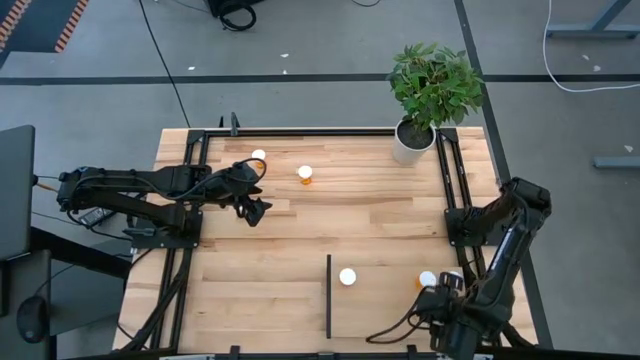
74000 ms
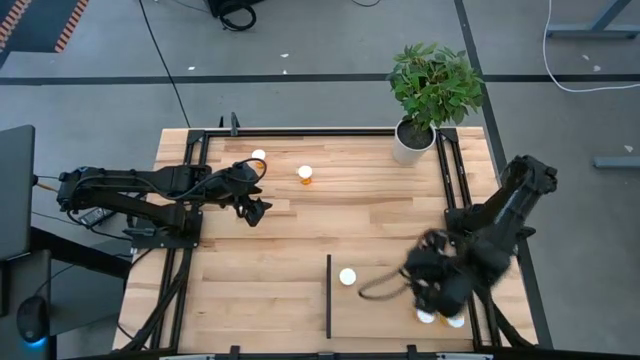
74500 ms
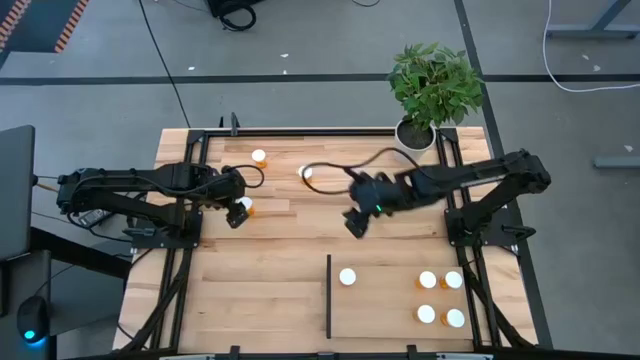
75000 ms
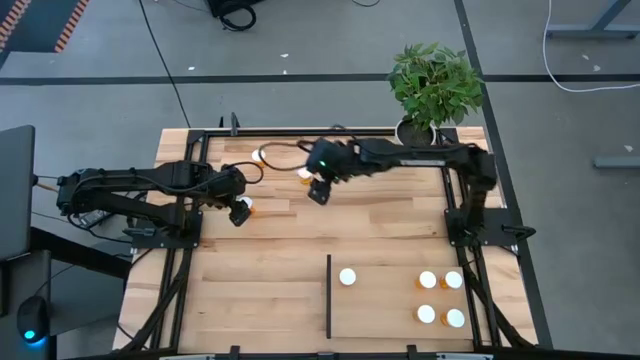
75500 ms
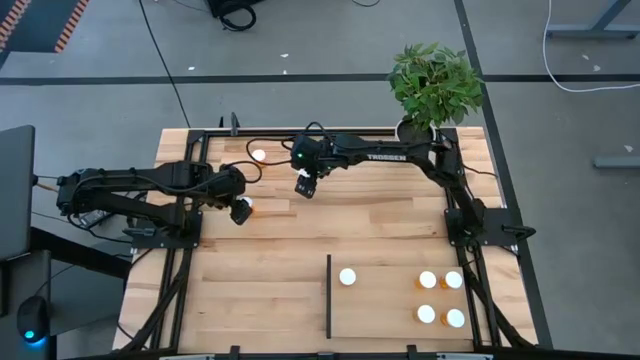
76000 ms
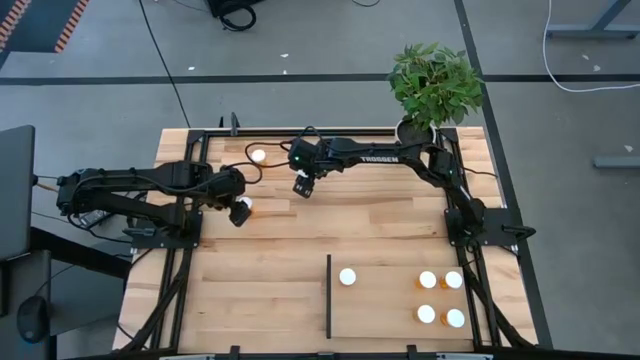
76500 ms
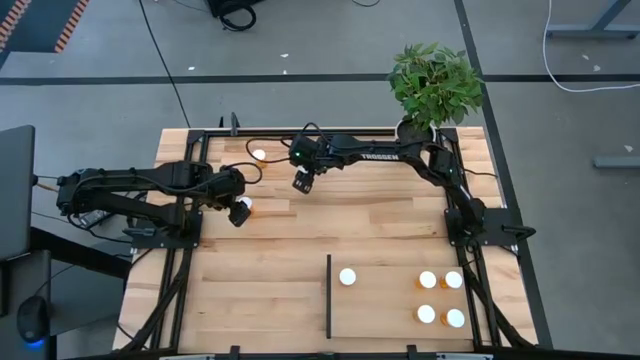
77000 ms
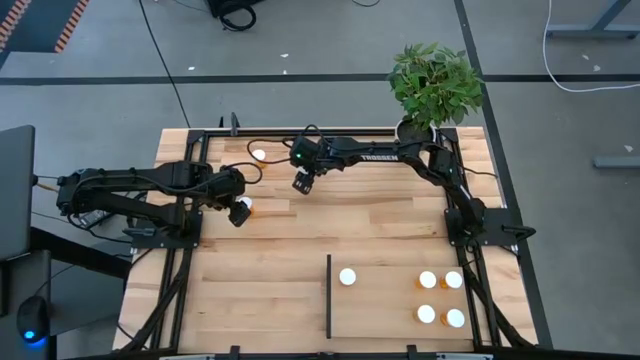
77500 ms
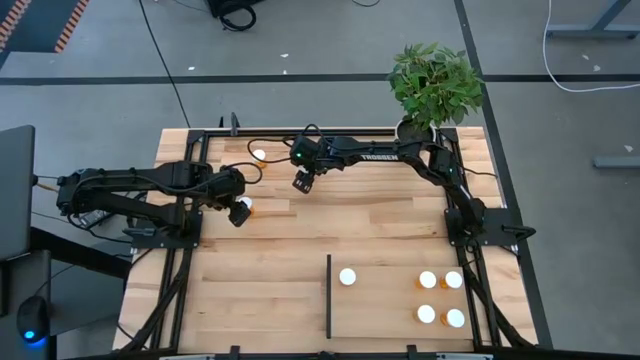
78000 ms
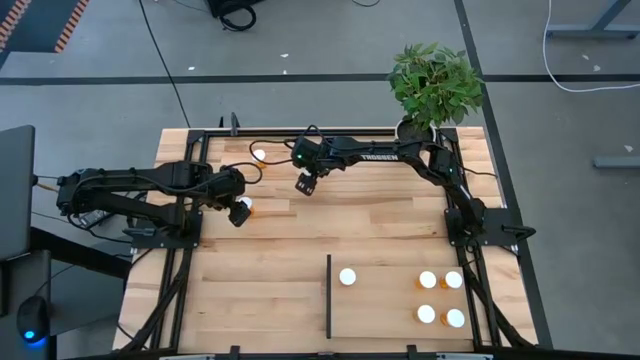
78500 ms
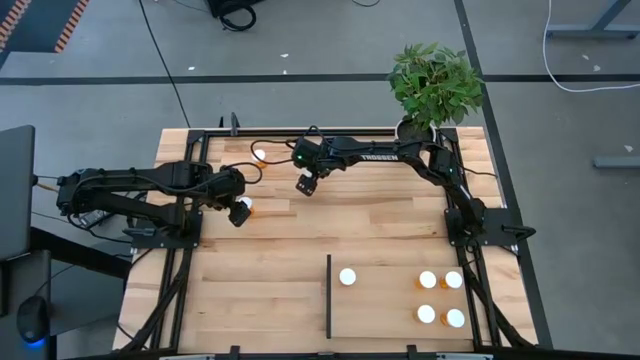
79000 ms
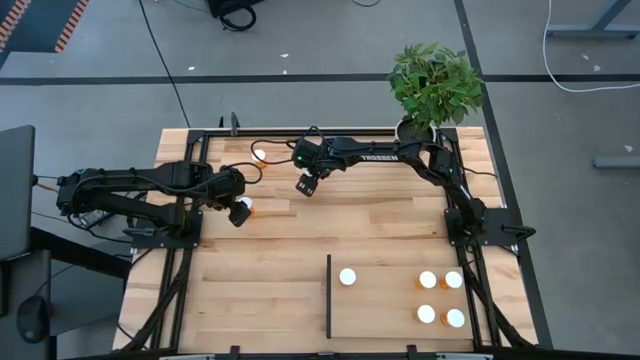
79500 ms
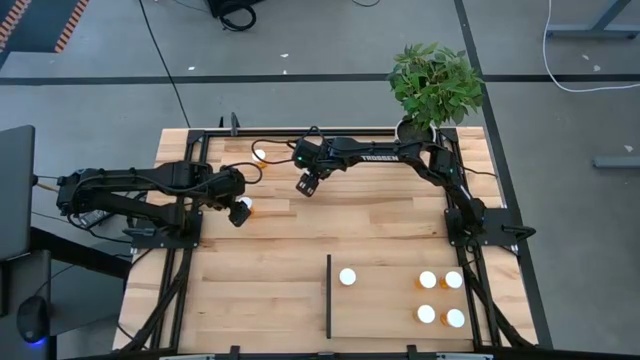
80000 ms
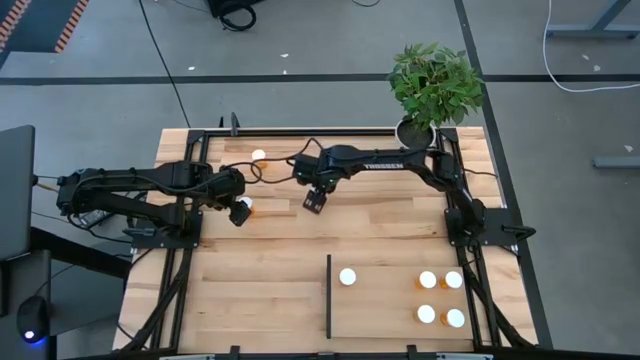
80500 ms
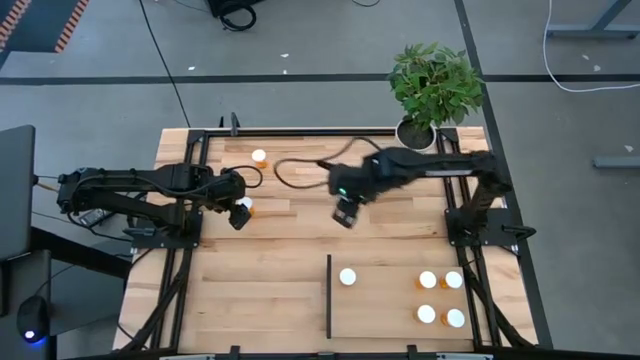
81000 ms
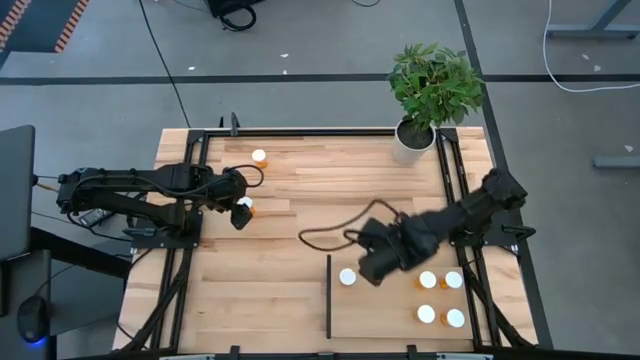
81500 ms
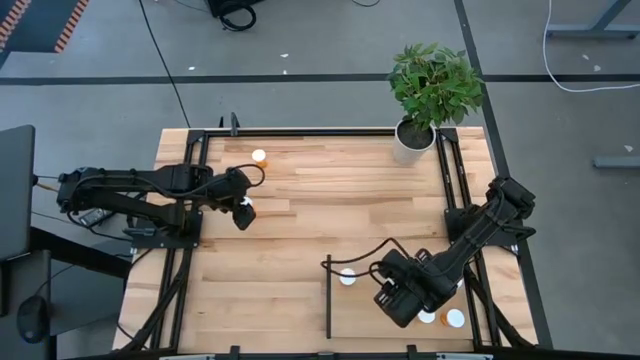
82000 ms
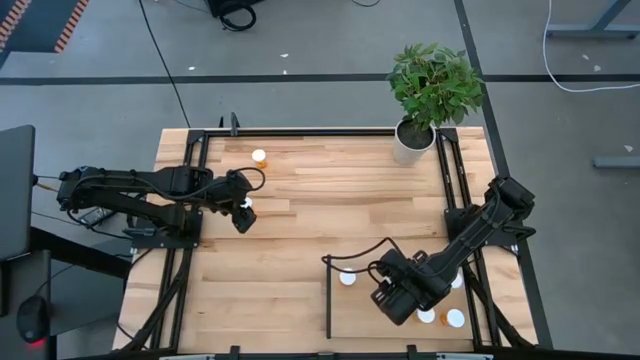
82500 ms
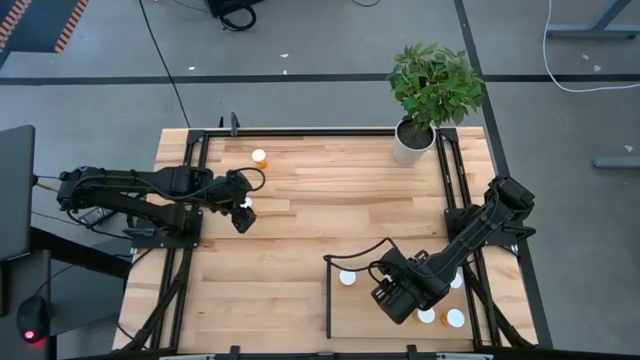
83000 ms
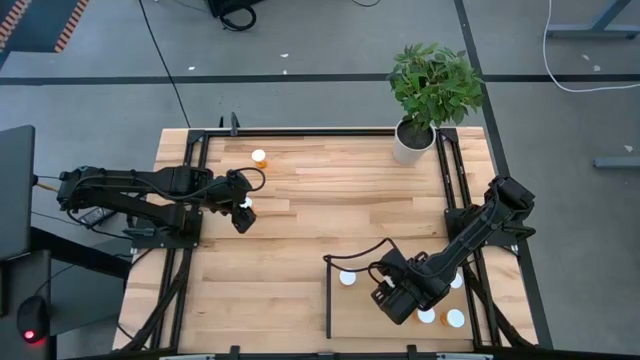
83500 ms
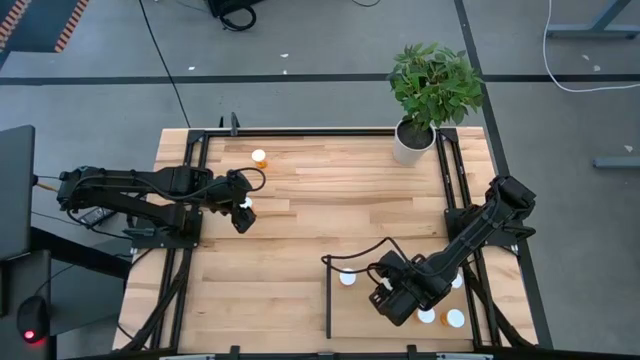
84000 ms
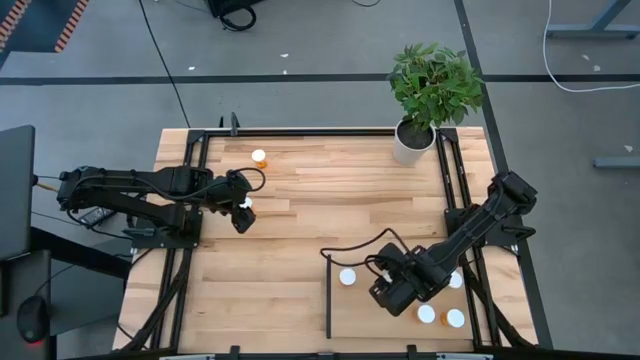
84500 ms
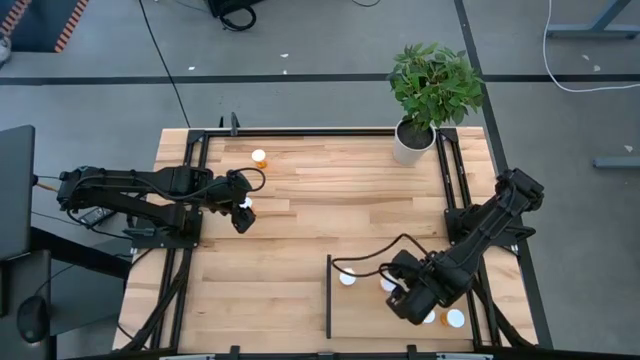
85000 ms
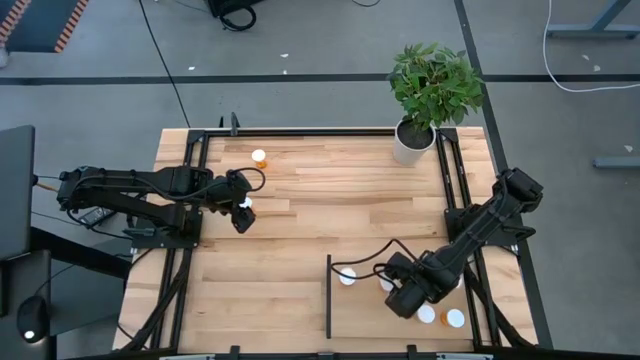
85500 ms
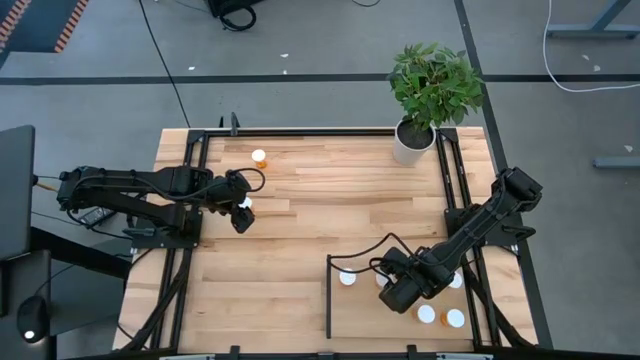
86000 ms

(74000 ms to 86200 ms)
Task: Pick and place medicine bottles onto shelf by color
Put the orange pill bottle on the shelf aligned with the other orange pill bottles

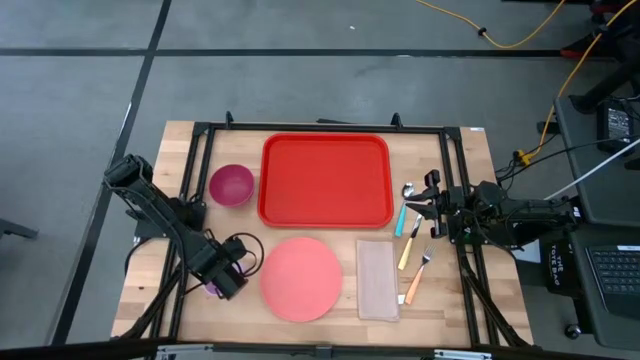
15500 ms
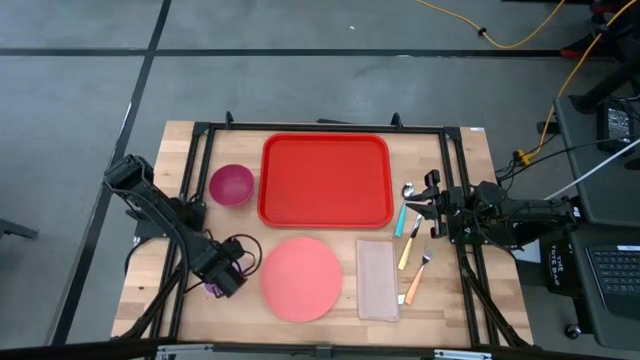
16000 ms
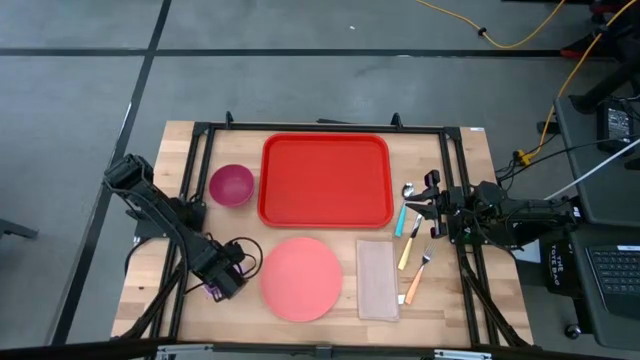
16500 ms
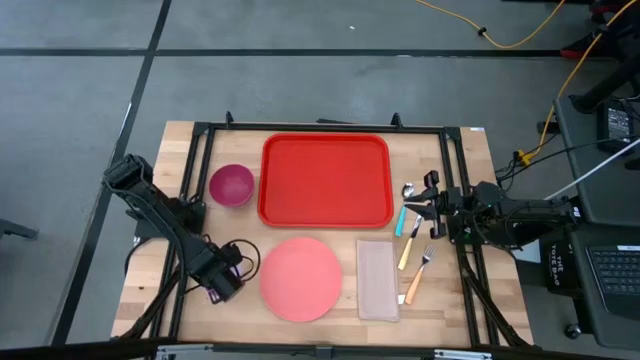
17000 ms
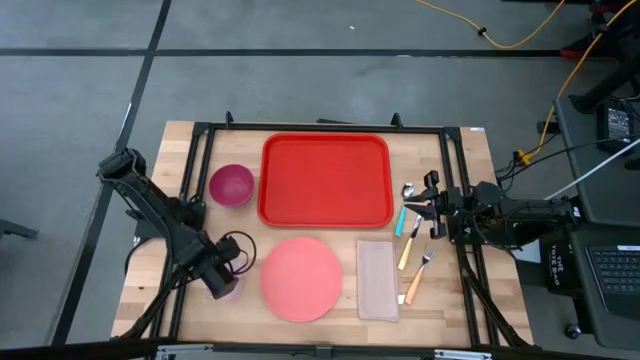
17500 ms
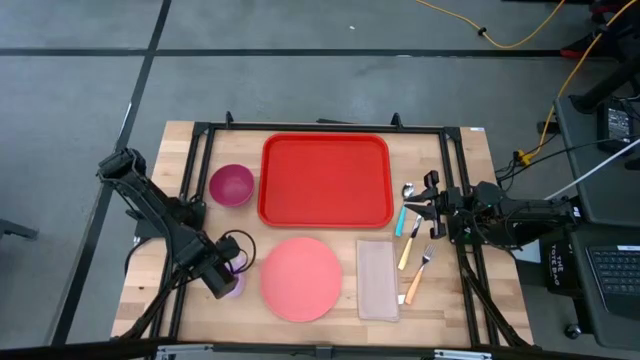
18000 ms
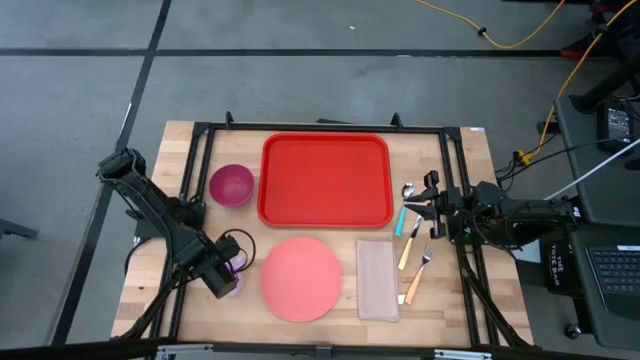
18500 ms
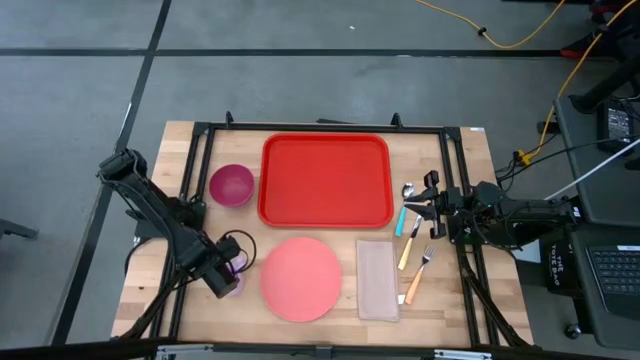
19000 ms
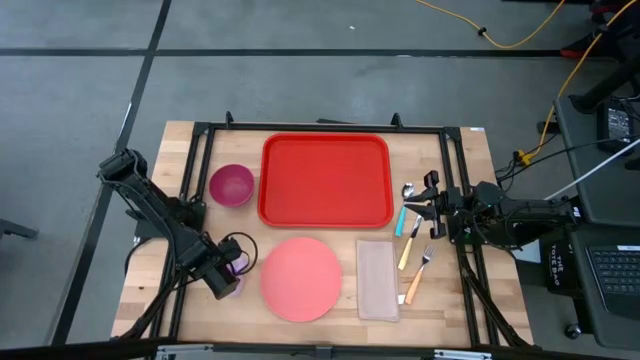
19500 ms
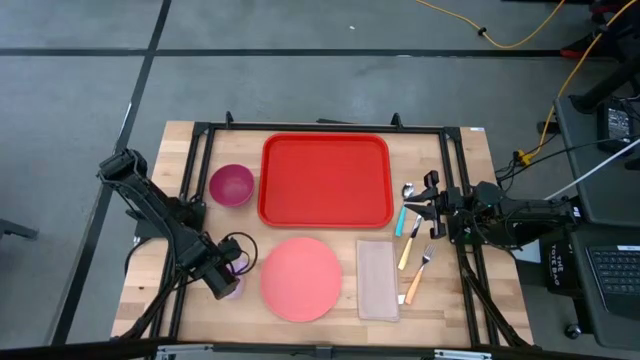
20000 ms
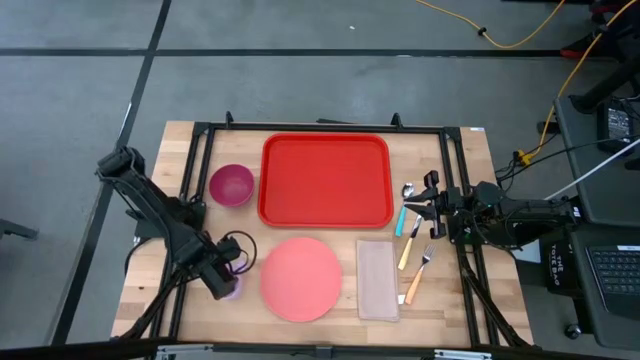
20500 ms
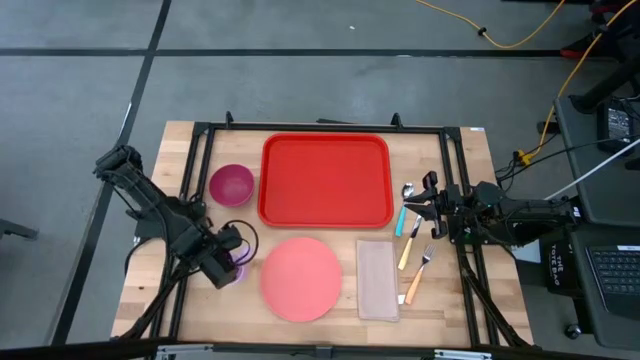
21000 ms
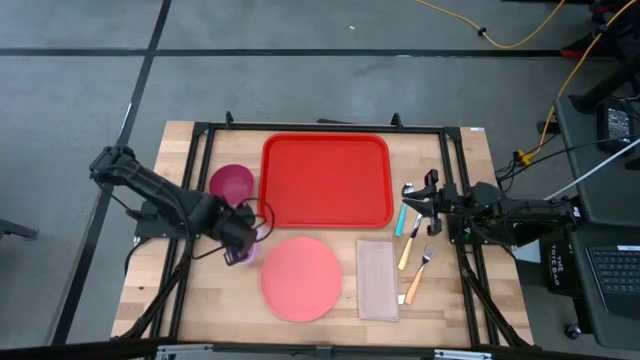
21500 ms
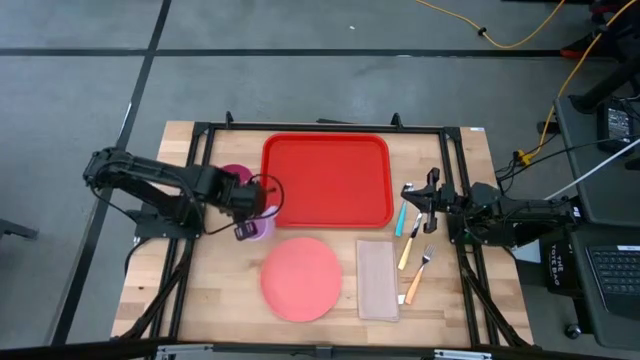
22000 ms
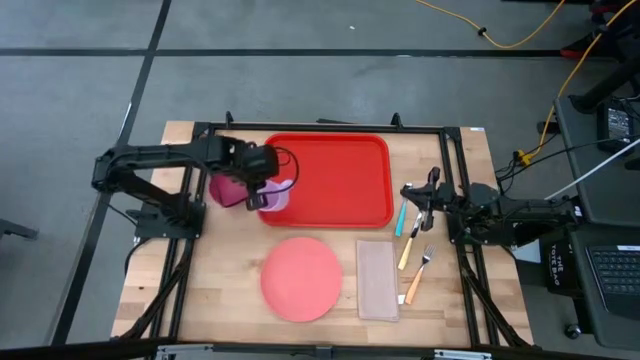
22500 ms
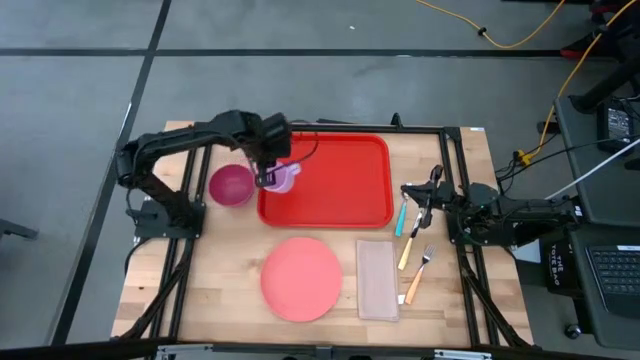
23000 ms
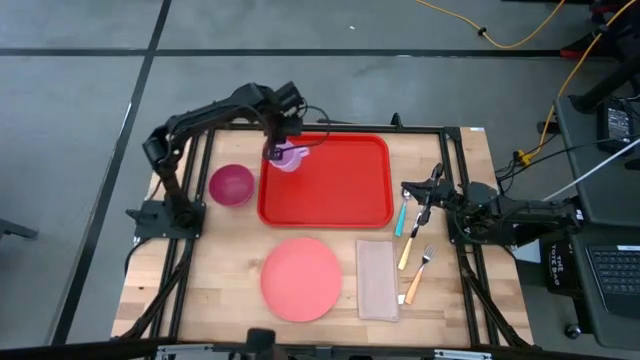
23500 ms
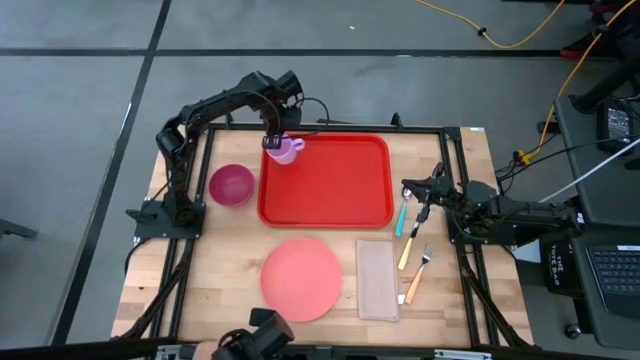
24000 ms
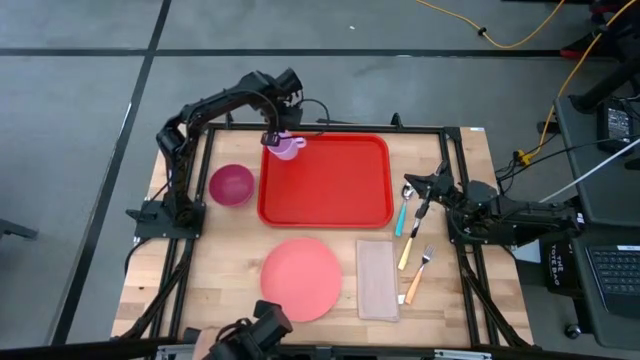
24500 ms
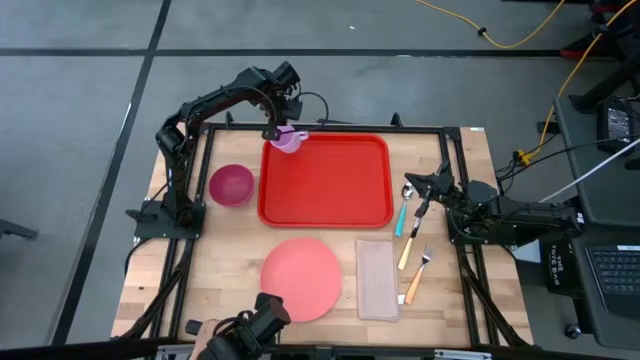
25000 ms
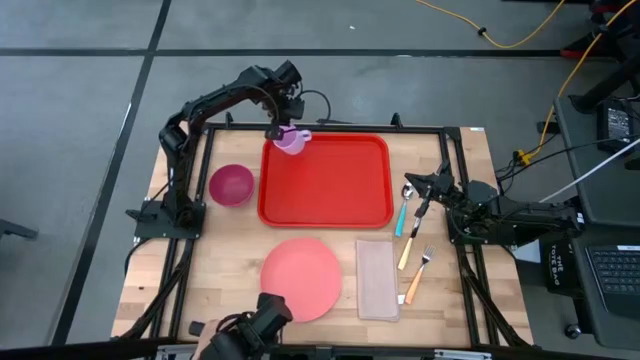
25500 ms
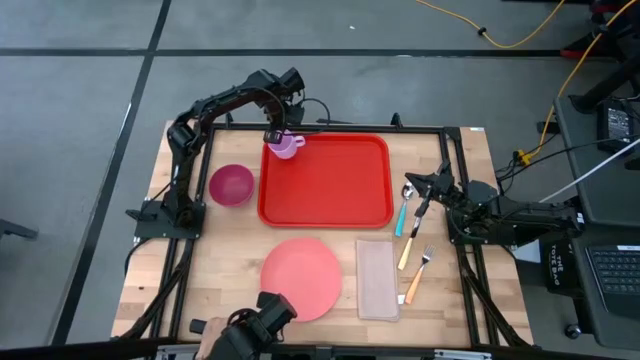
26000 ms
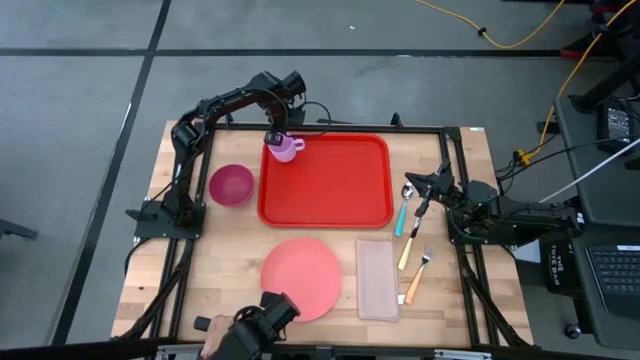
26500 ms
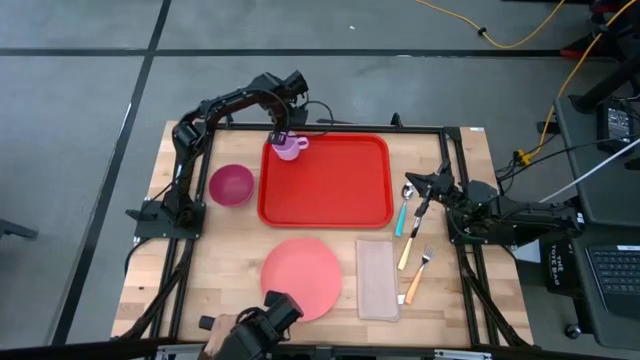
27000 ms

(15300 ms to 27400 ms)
Task: Set up tray
Put the purple mug on the top left of the red tray
